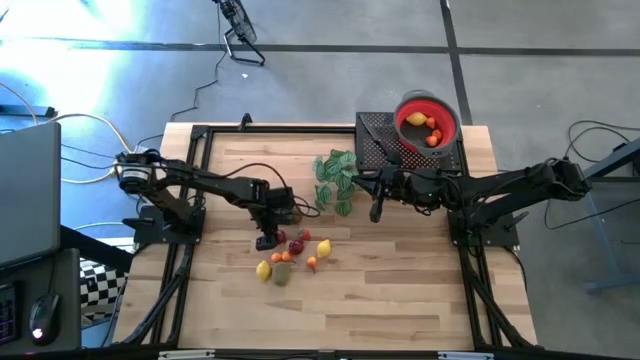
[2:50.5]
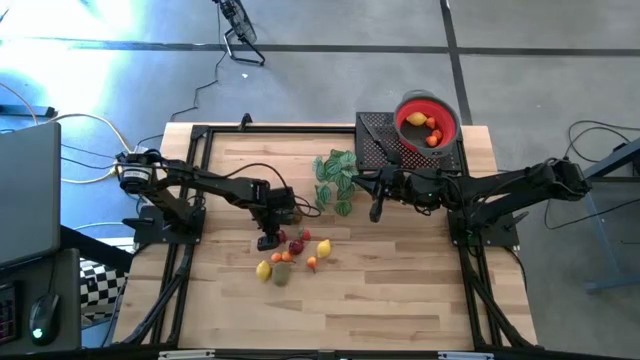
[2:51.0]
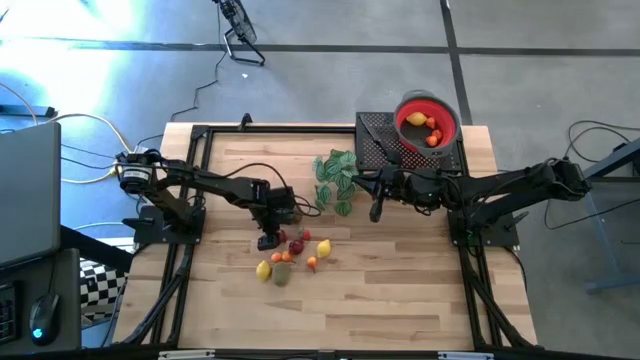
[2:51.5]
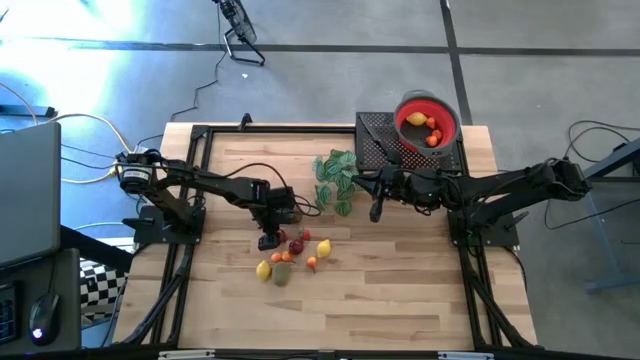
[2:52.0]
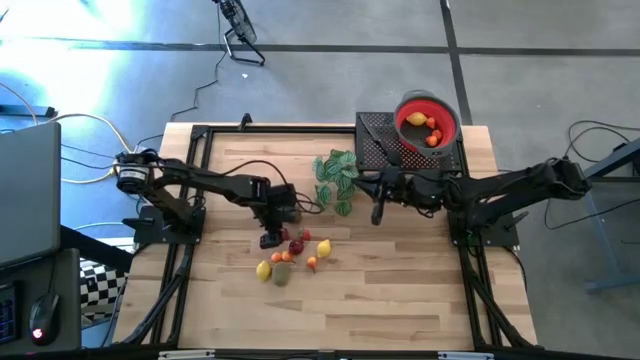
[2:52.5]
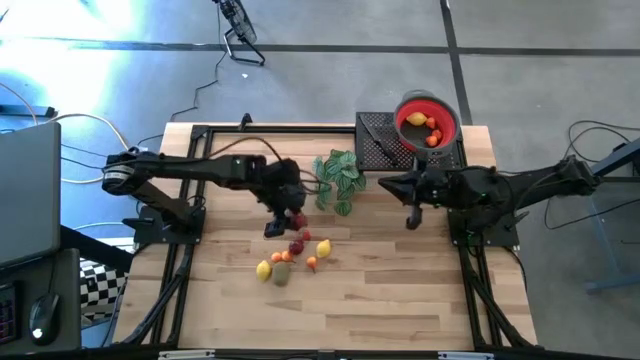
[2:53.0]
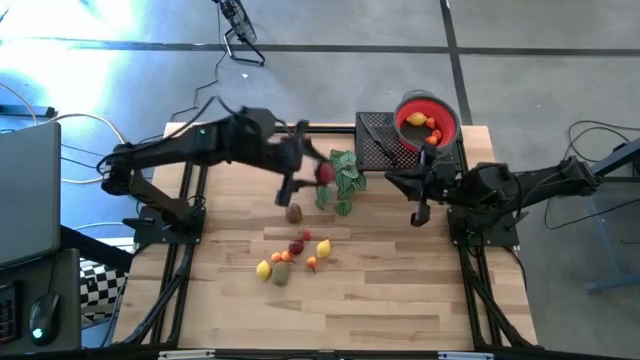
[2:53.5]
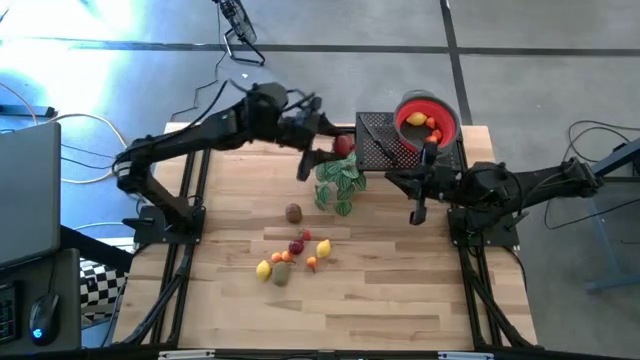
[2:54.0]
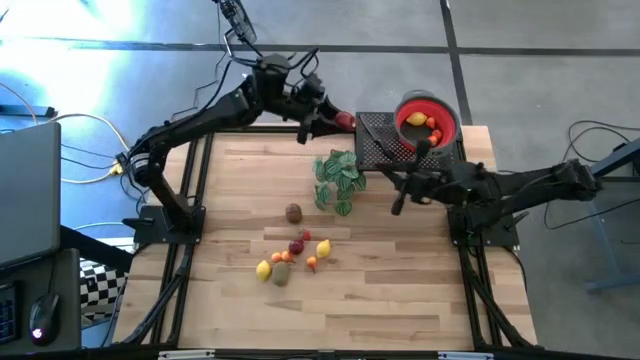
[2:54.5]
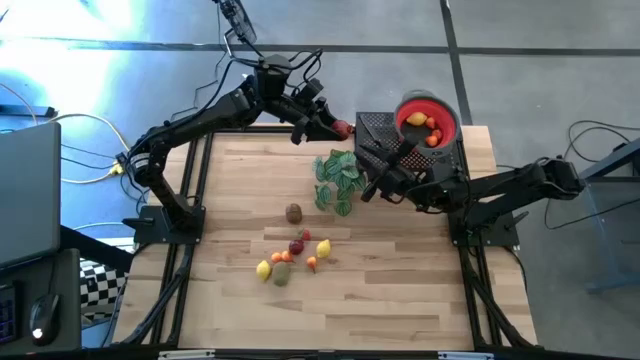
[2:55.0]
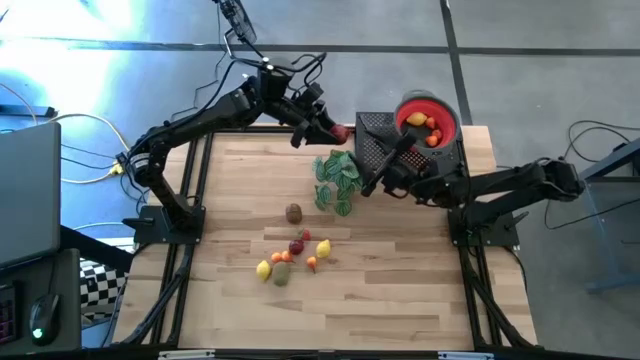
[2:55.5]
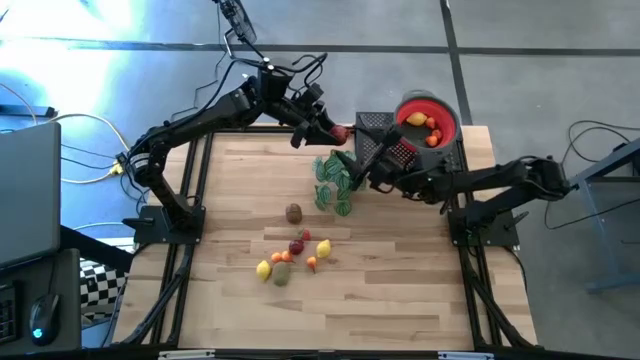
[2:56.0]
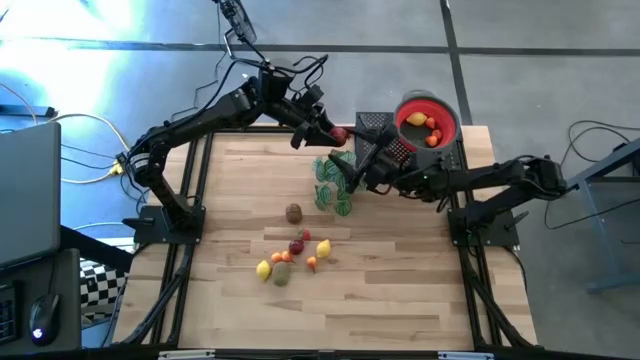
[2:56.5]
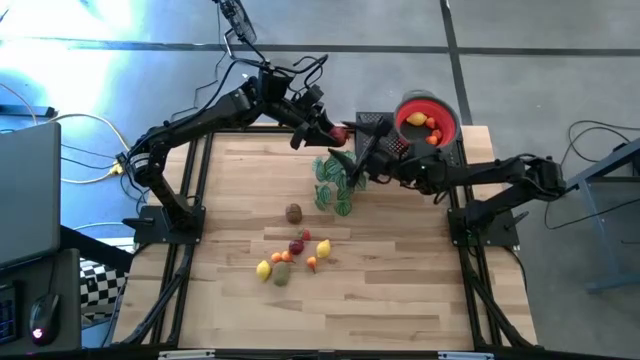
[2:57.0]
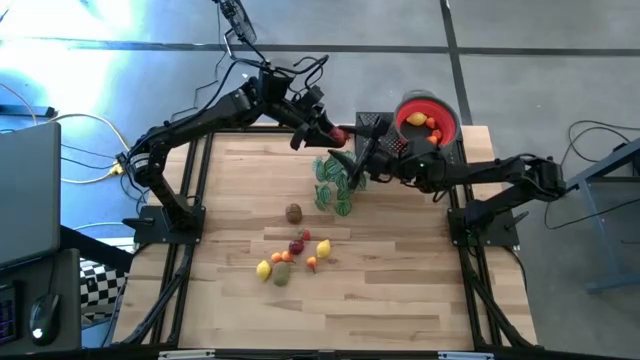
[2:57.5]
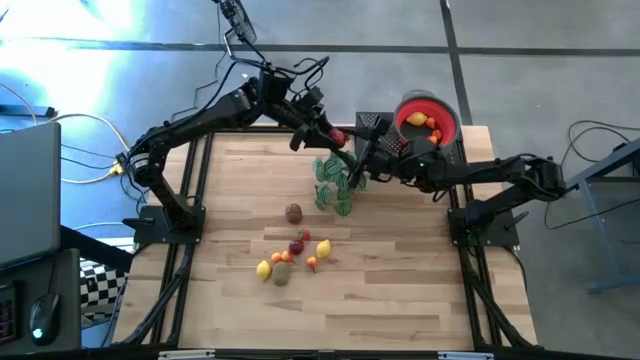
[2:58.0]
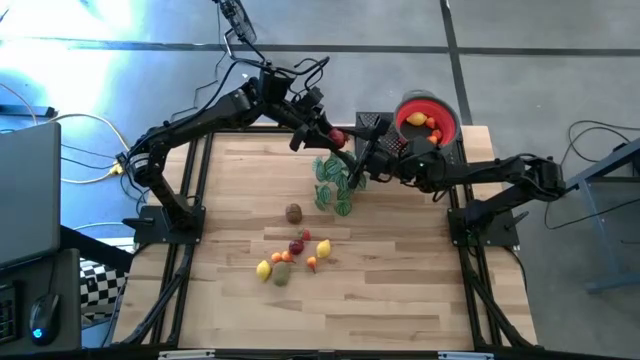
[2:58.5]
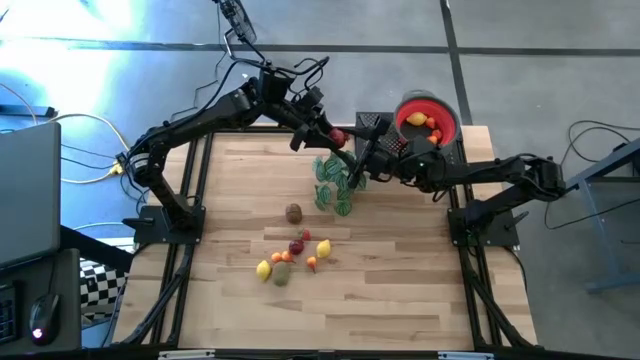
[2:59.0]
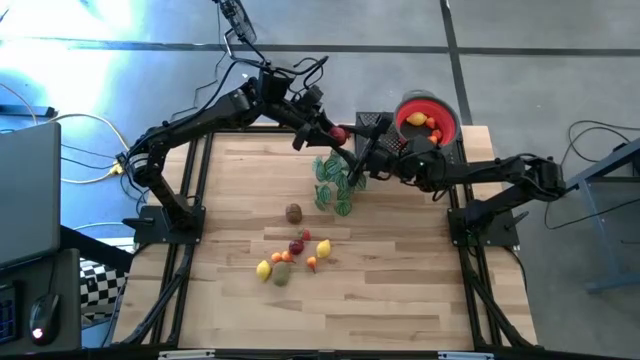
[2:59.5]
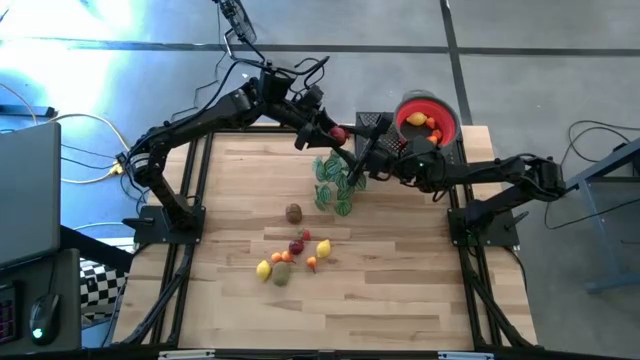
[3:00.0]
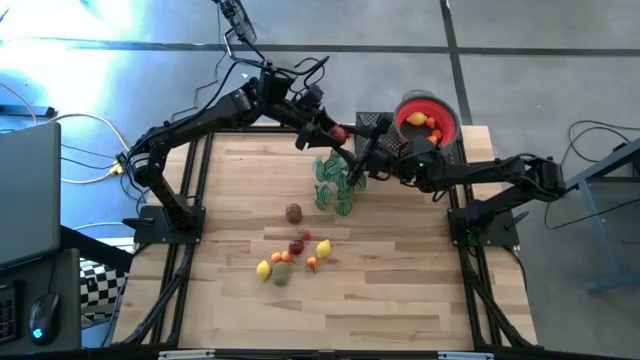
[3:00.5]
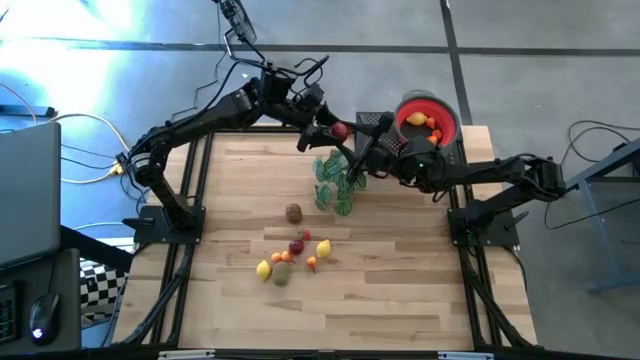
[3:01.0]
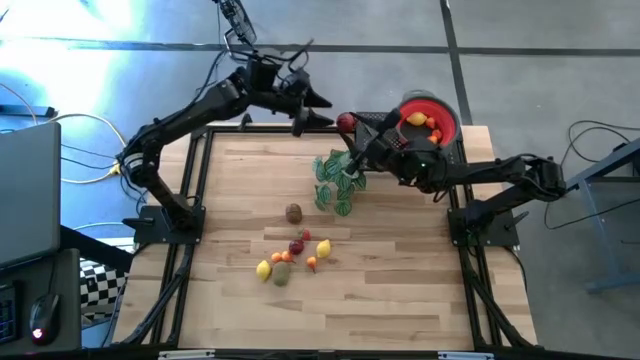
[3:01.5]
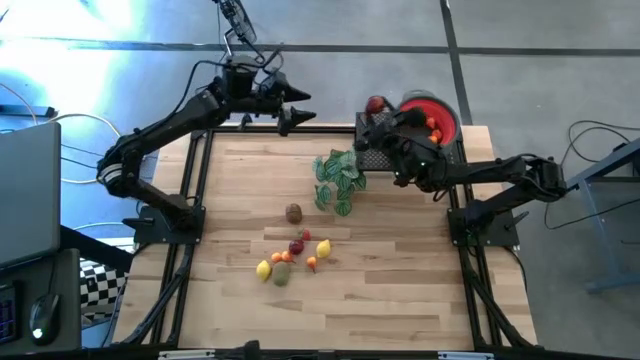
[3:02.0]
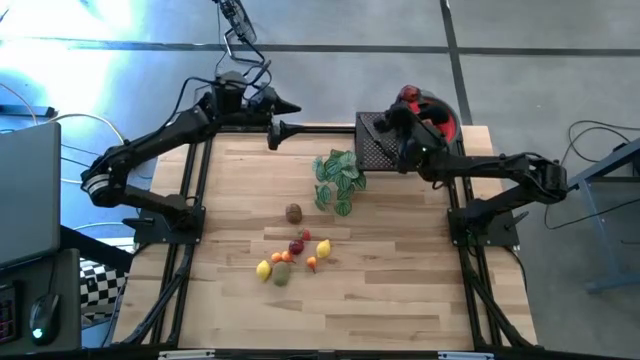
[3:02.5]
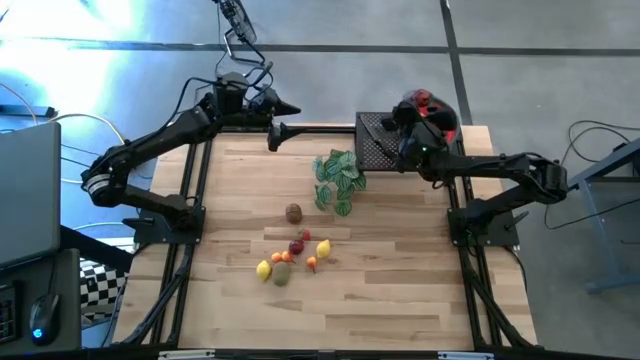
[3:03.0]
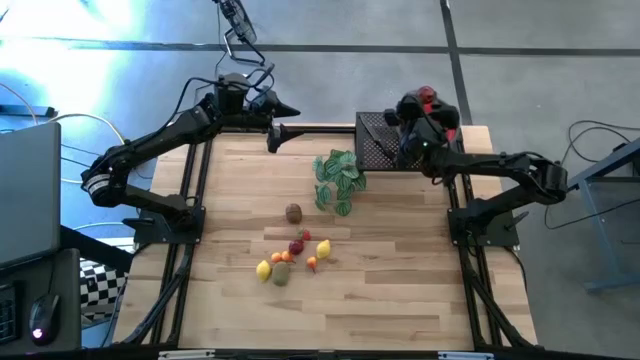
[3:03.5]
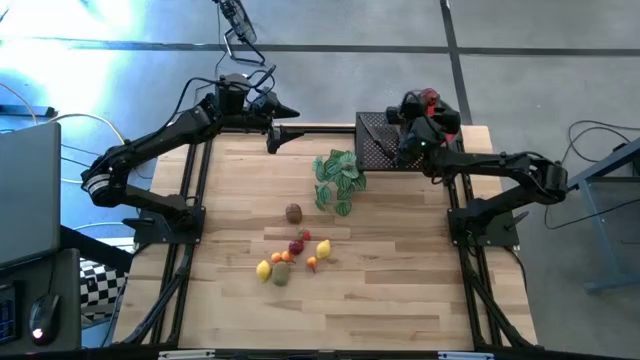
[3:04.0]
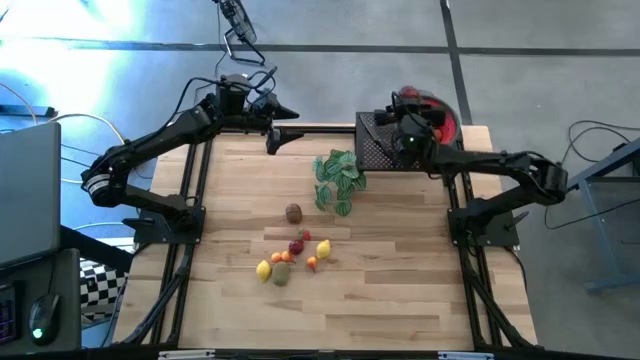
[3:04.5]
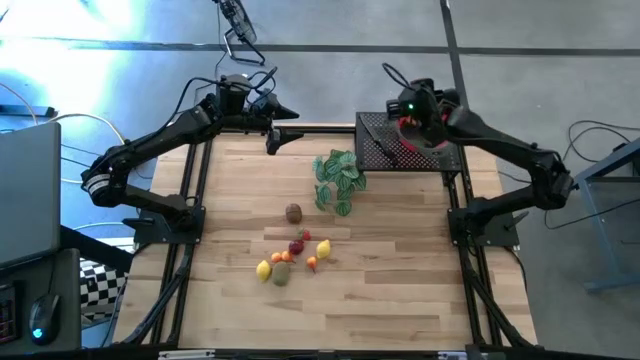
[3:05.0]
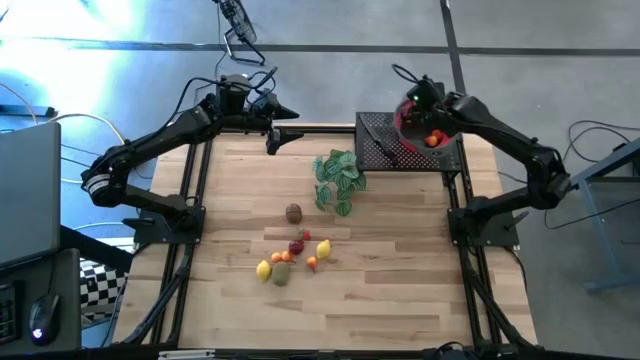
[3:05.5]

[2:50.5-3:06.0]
Task: Pick & Place Fruit
Put the pomegranate into the red colander

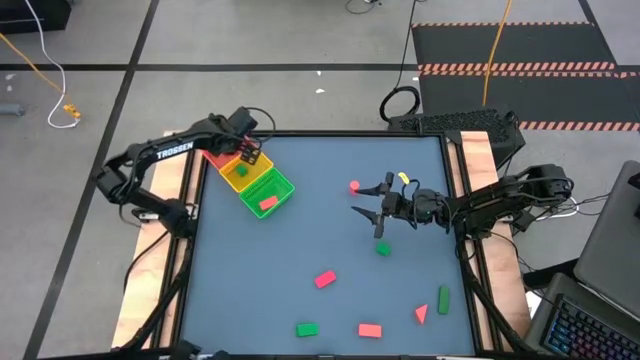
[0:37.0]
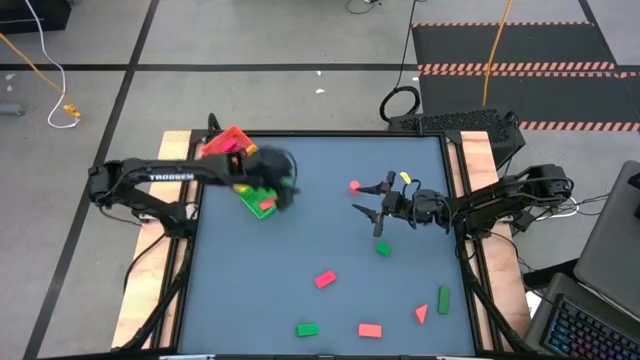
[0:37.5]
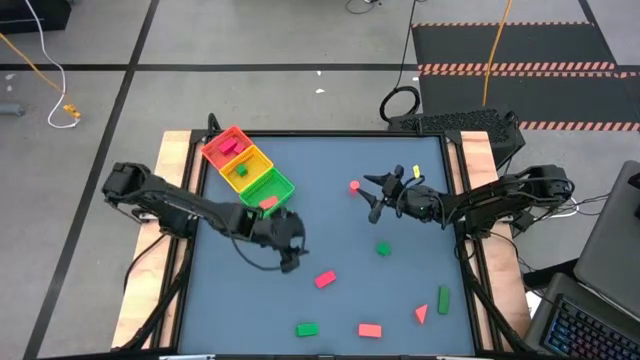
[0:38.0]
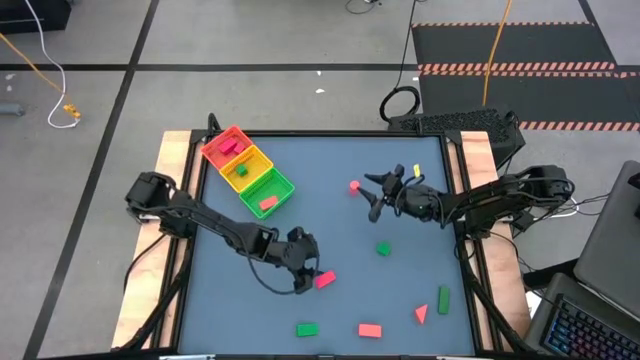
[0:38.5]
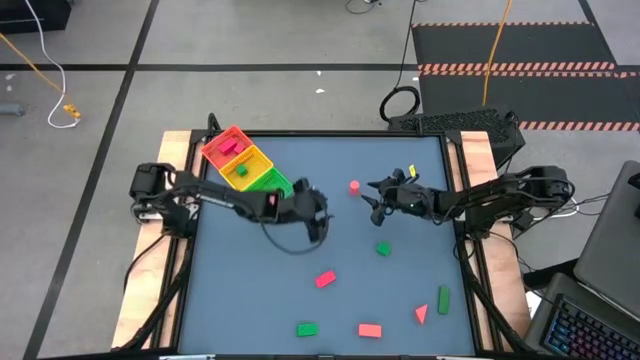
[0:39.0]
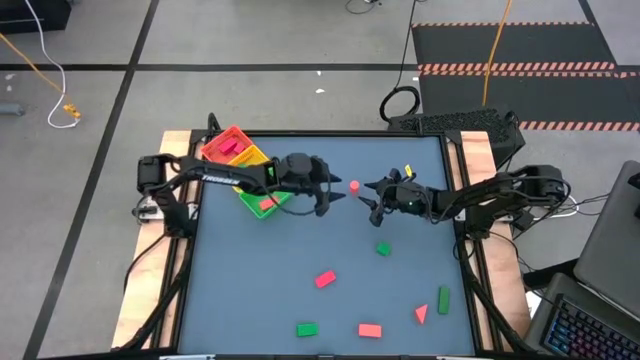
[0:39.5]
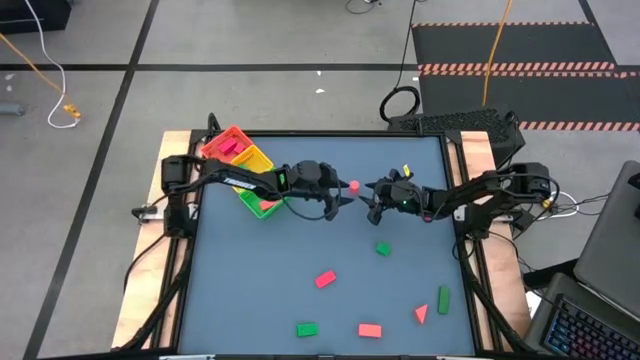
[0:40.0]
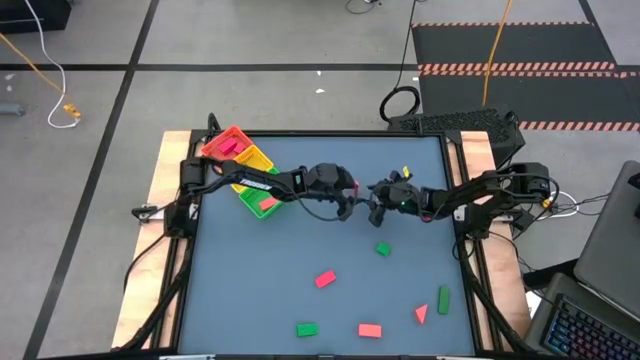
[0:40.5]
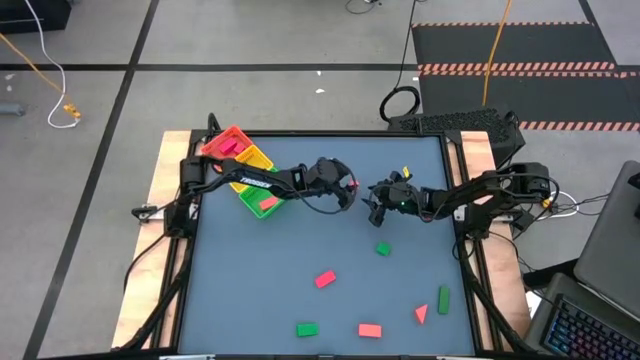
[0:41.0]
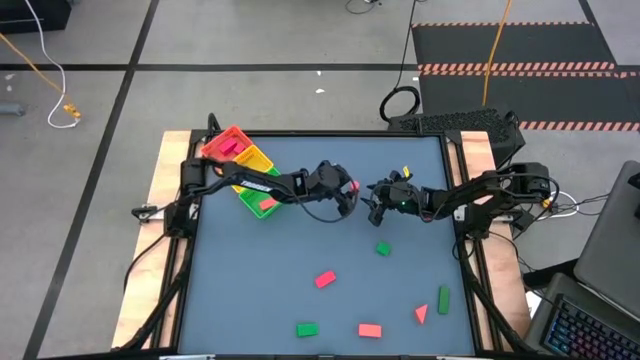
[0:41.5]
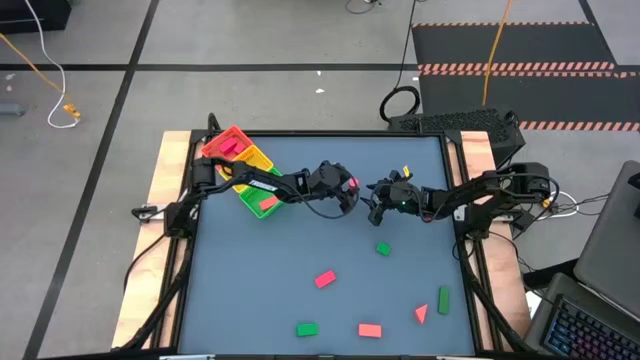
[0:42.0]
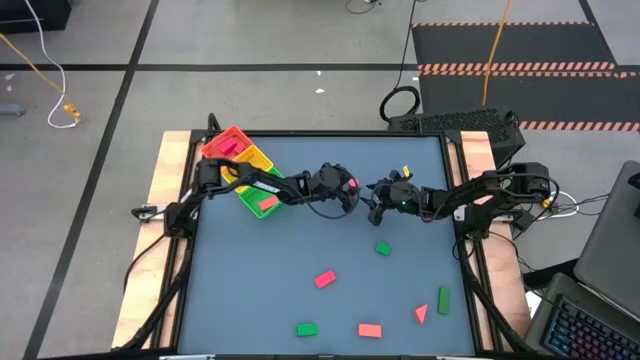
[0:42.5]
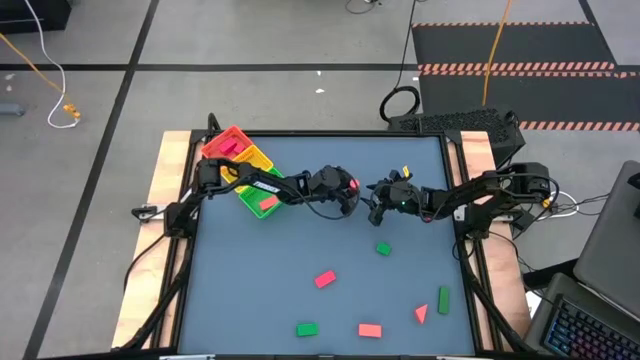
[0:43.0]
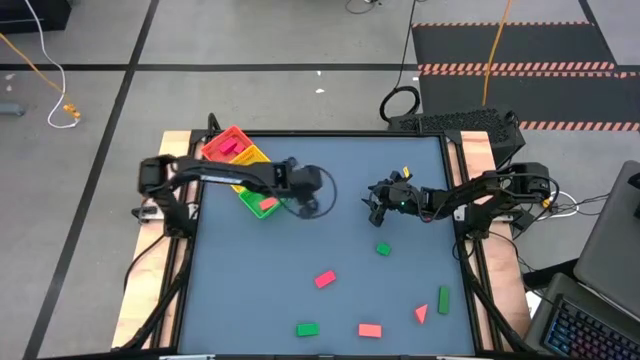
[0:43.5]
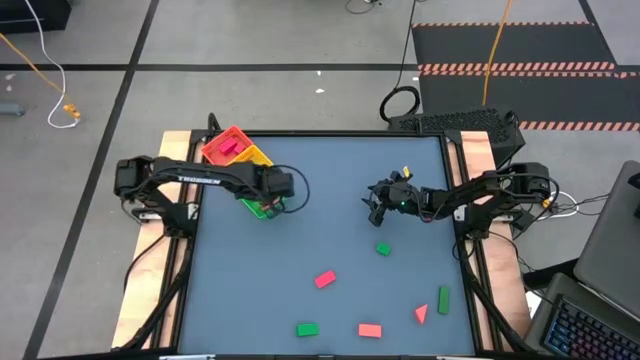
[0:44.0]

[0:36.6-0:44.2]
Task: Sort & place blocks by color
Put the orange block into the green basket
